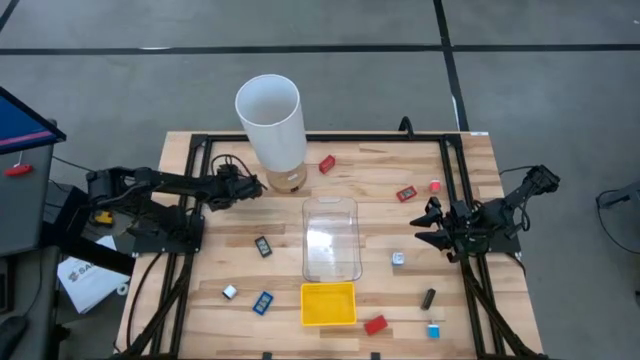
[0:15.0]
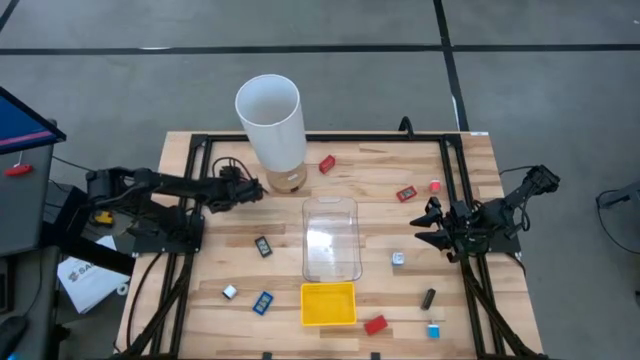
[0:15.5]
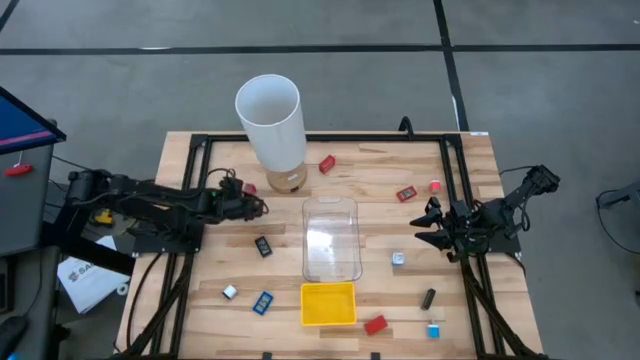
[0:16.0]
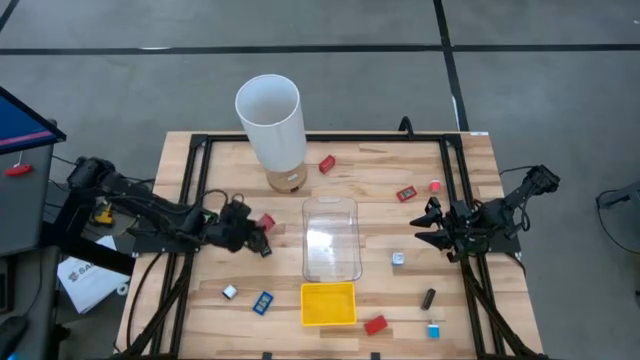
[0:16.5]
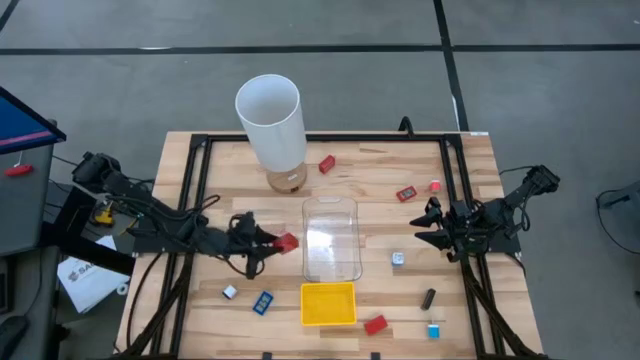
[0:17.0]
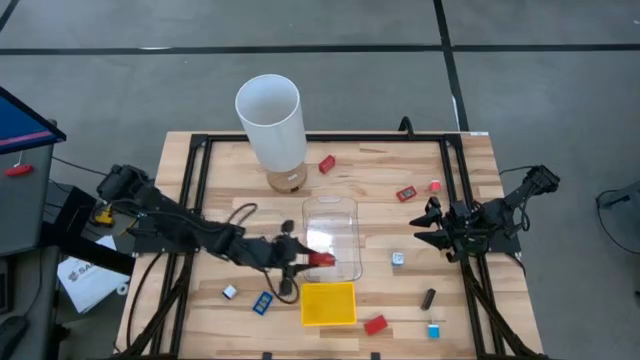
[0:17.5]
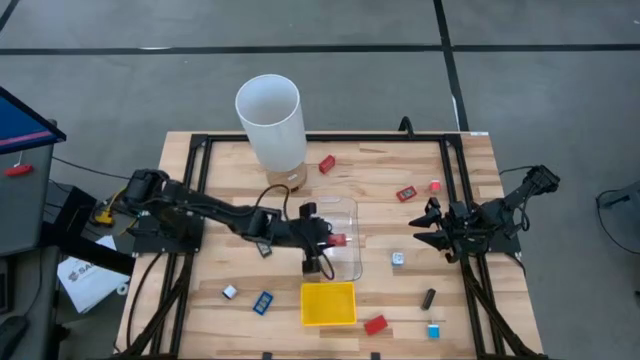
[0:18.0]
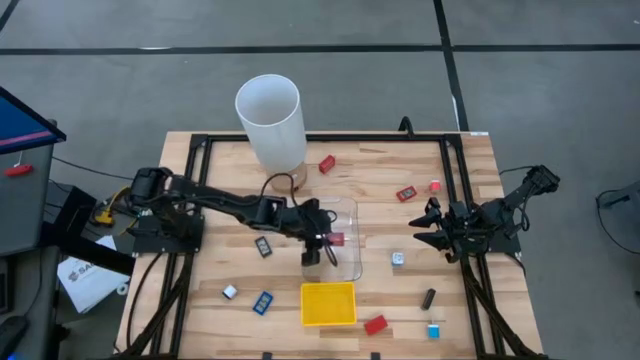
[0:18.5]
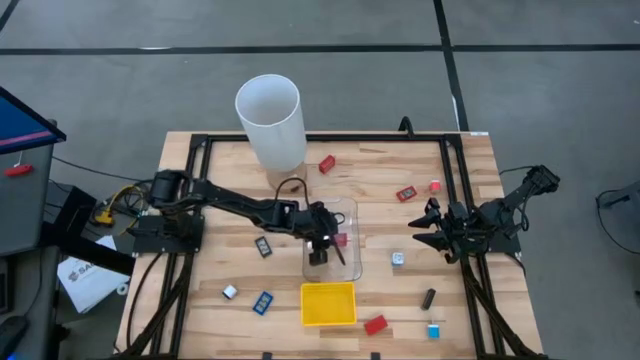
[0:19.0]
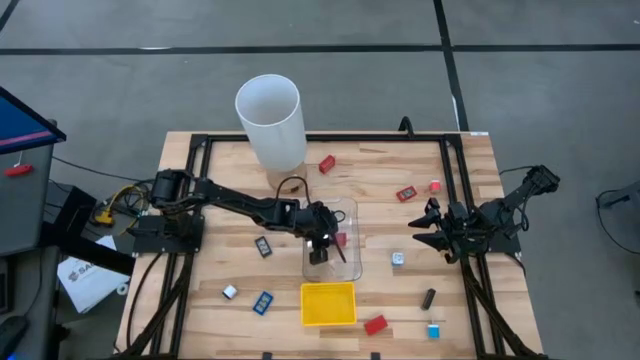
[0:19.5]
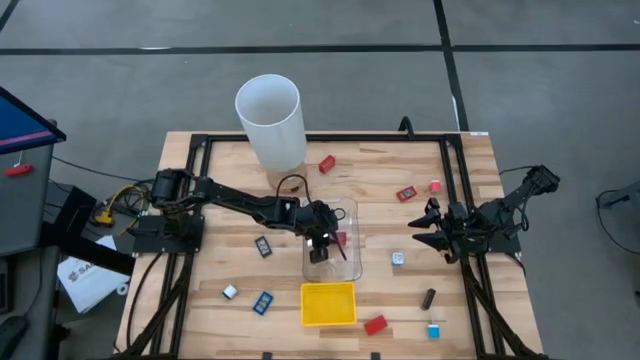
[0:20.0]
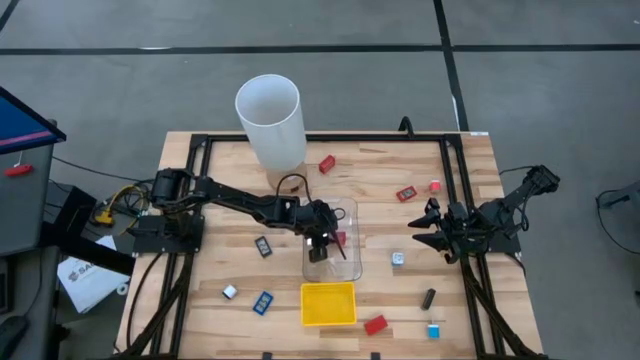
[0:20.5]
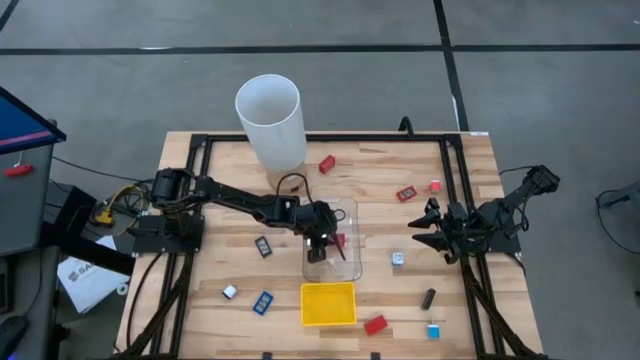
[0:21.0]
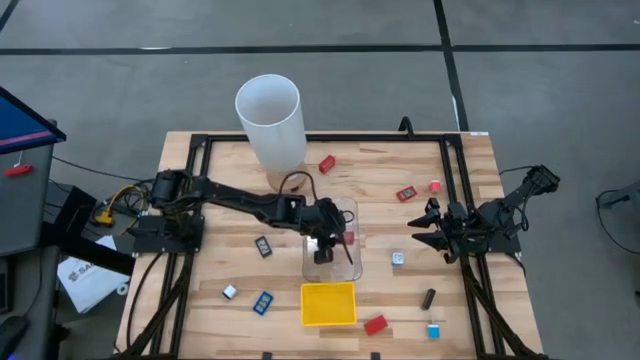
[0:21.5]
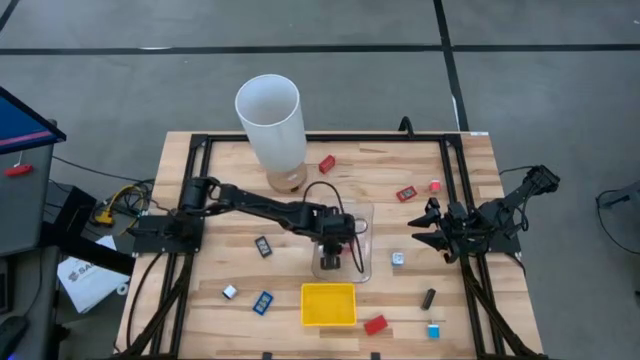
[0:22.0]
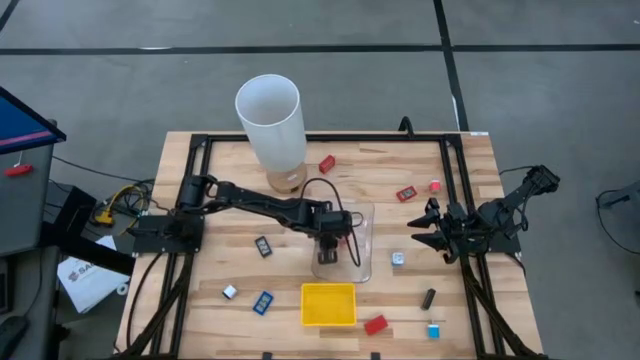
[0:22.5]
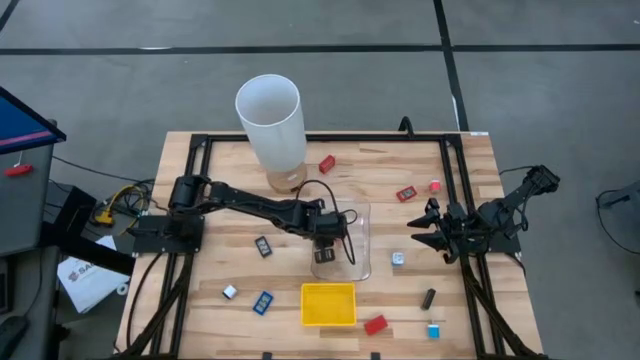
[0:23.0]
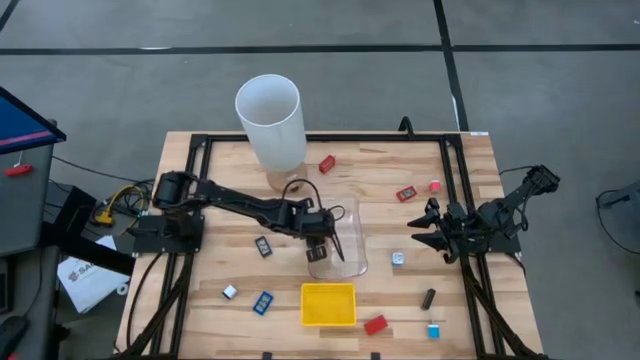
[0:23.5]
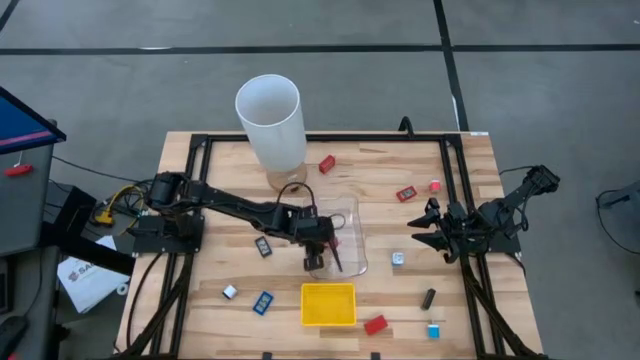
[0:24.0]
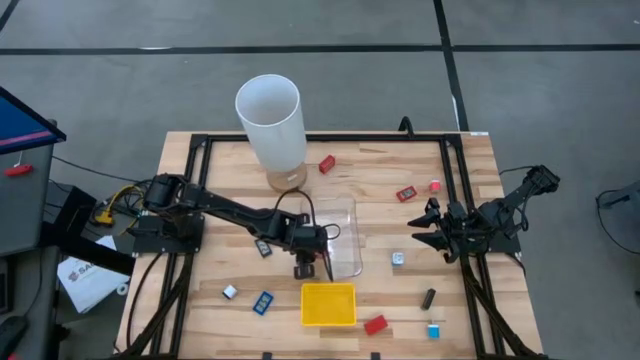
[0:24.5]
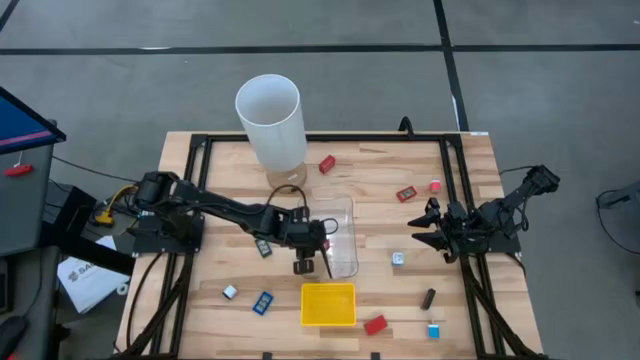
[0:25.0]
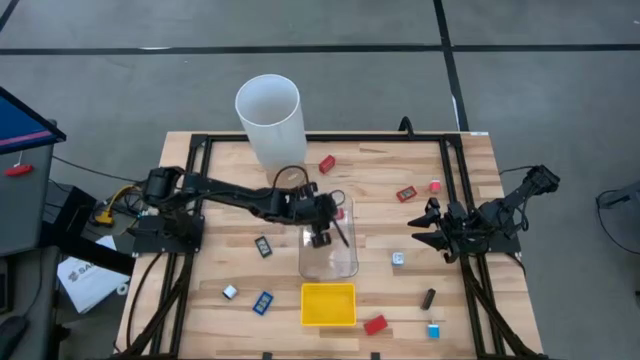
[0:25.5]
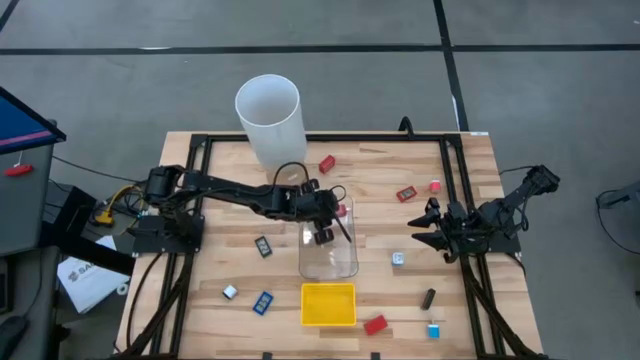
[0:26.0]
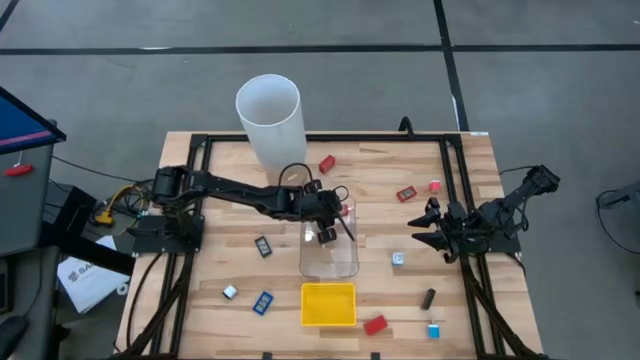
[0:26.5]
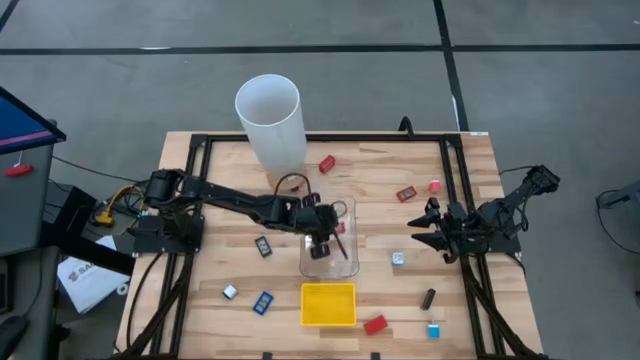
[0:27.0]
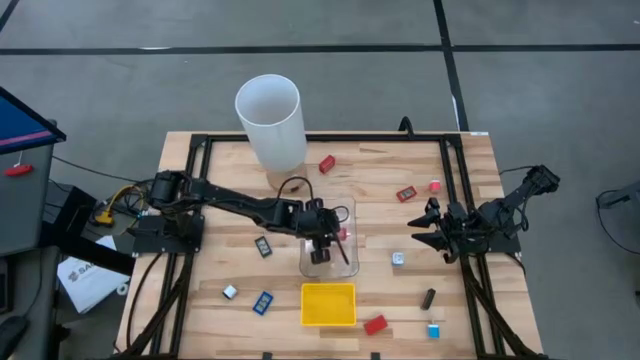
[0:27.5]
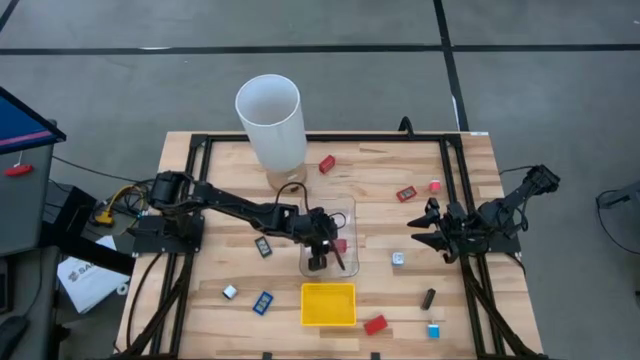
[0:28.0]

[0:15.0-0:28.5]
Task: Pick & Place Office items
Put the bottom red charger adapter into the transparent bin

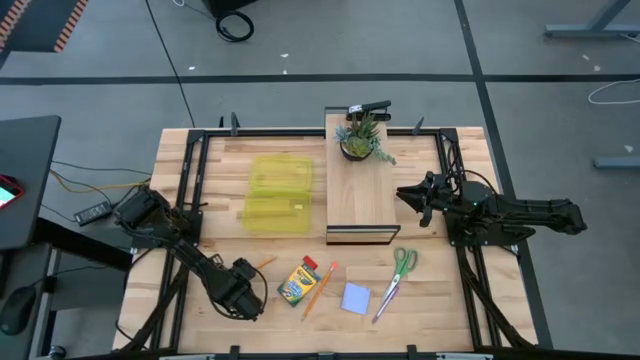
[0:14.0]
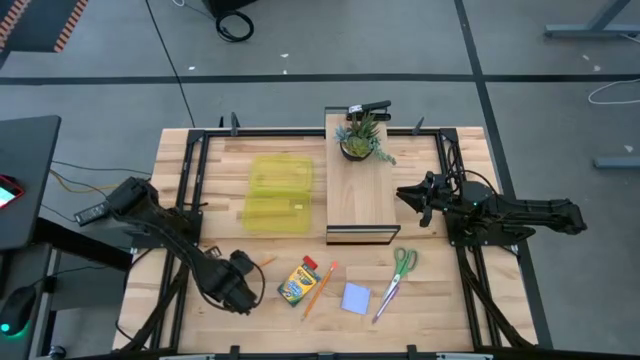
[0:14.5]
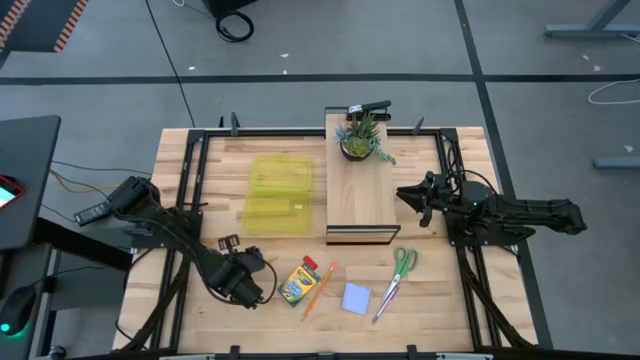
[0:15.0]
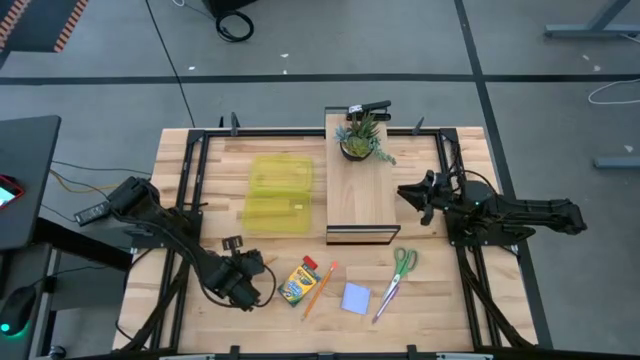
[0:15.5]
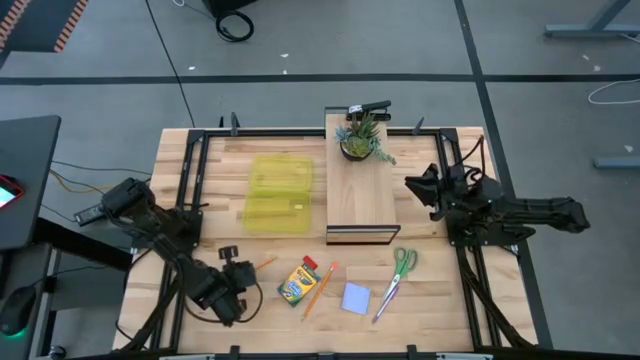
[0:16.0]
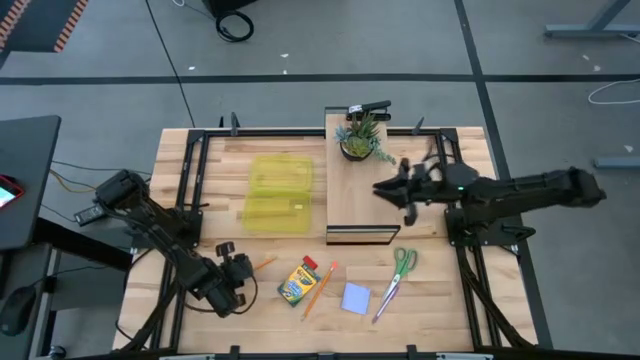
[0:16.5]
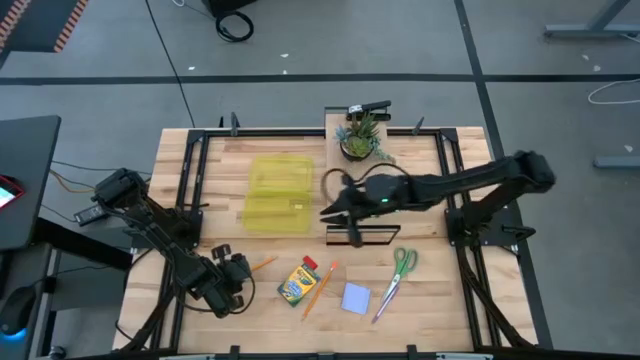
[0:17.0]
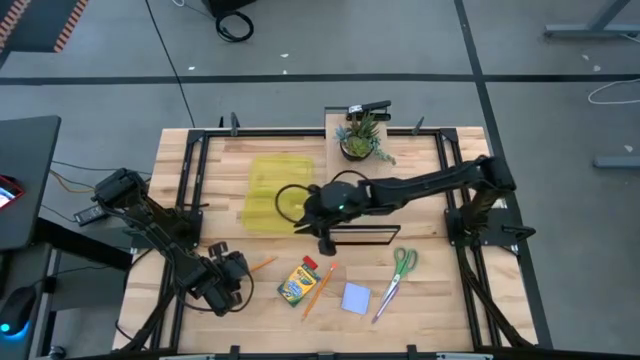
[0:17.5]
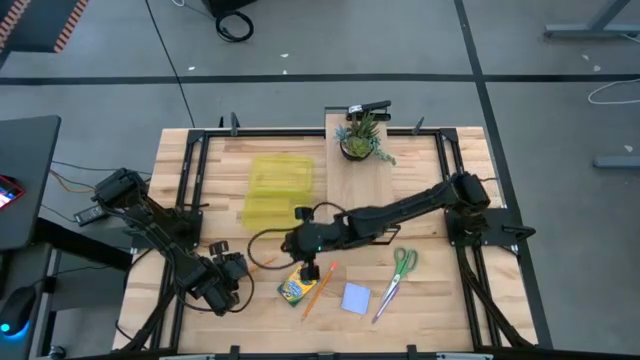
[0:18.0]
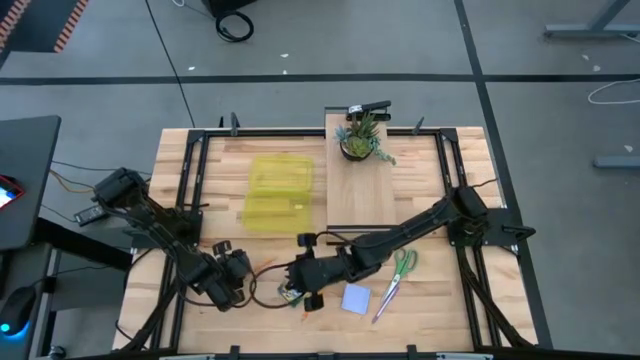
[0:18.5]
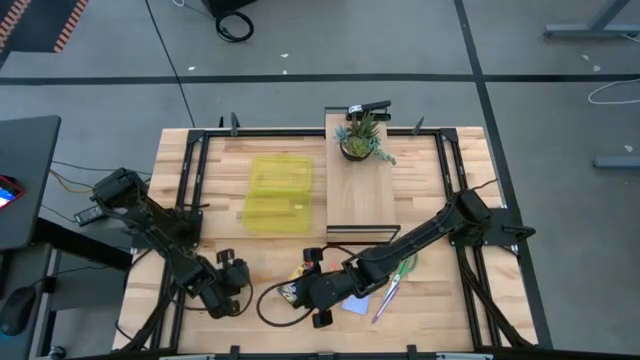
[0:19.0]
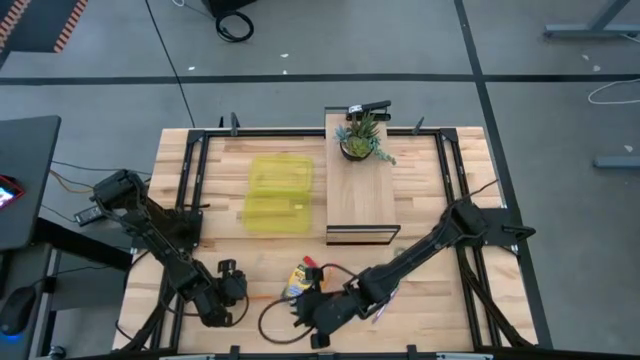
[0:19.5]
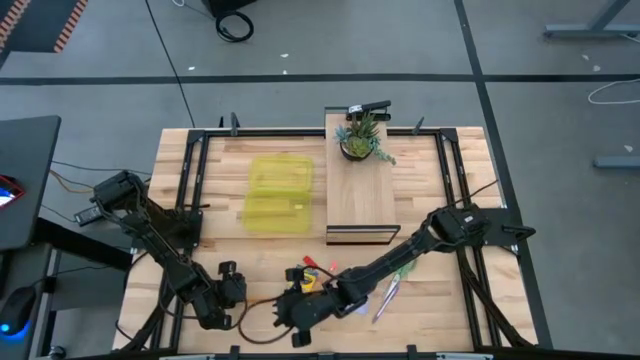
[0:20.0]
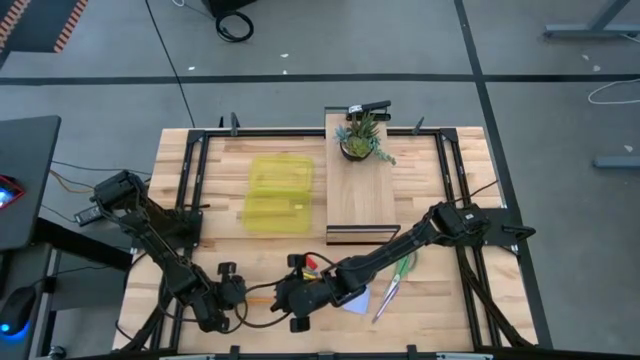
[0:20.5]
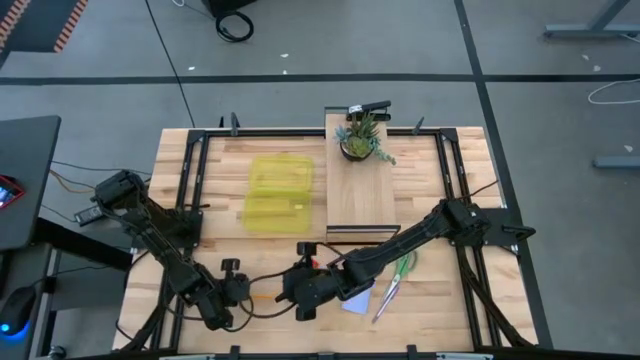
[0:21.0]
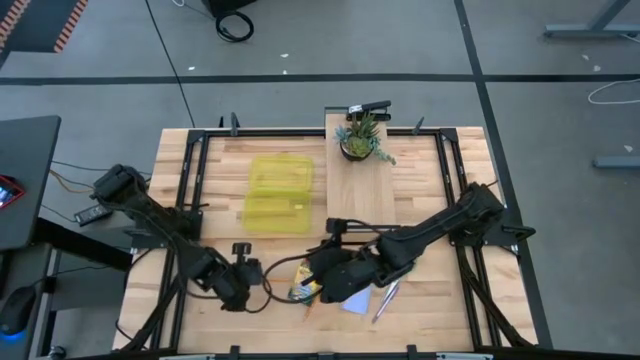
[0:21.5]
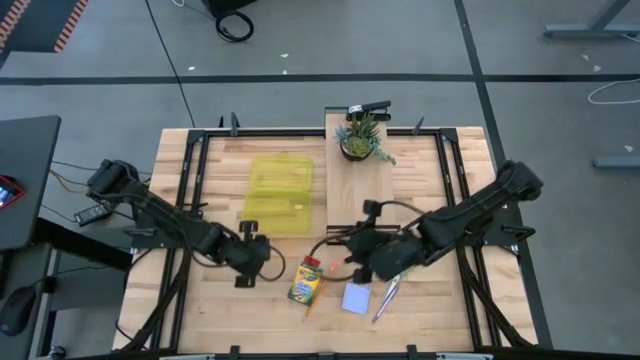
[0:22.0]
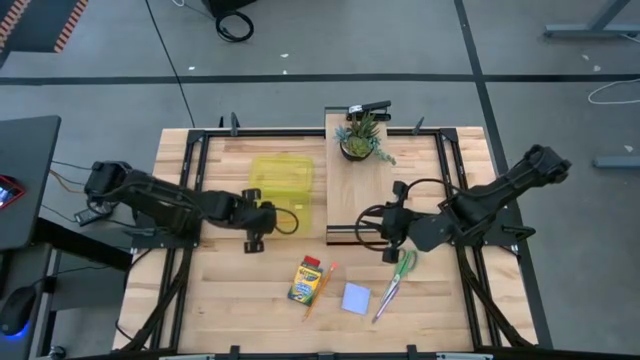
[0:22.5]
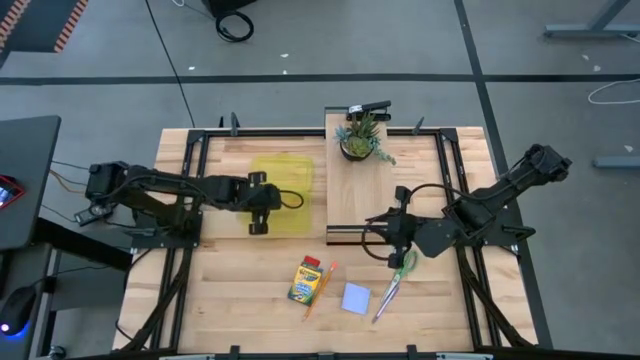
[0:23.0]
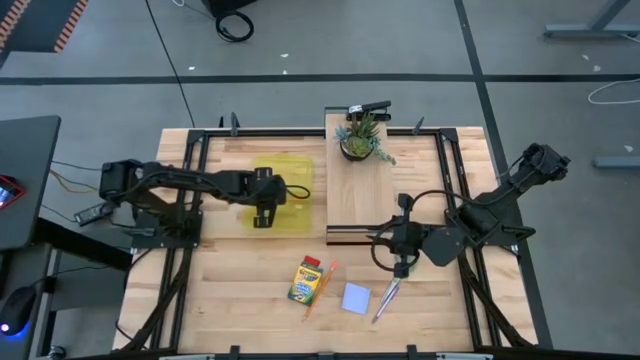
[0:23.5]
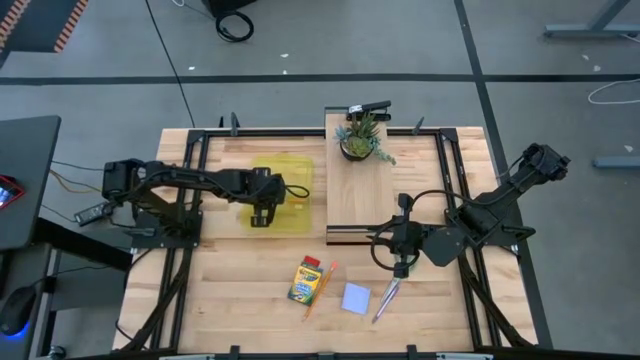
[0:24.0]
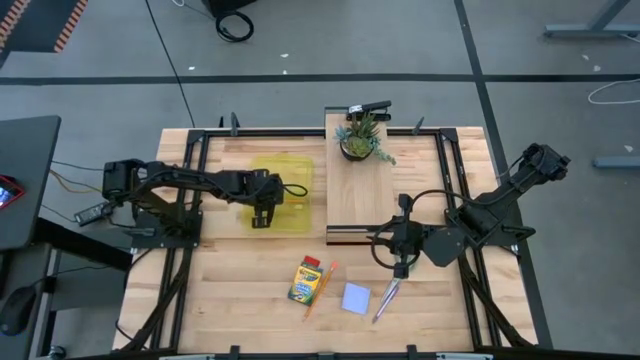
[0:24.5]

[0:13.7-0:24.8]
Task: Pack school essentials
Put the bottom left pencil into the supply box
